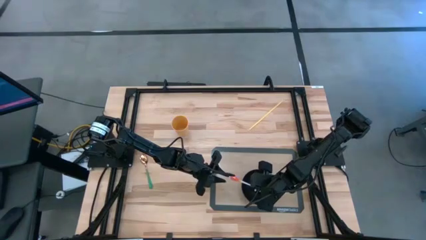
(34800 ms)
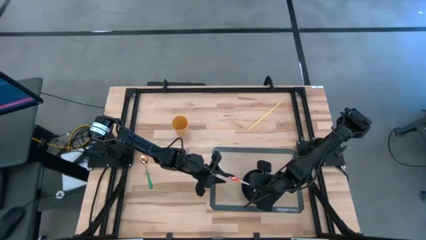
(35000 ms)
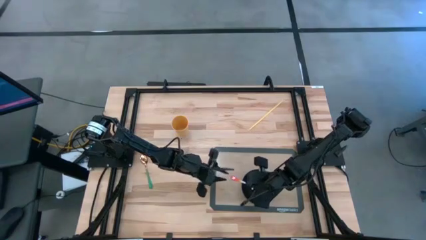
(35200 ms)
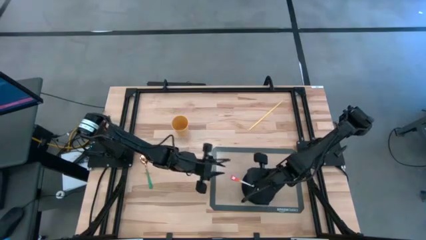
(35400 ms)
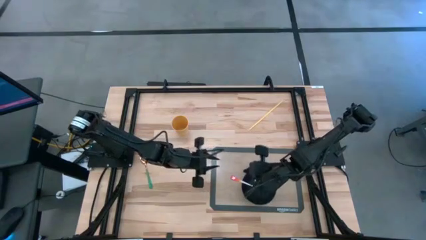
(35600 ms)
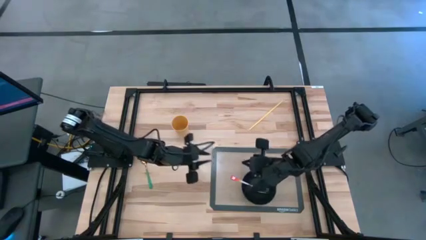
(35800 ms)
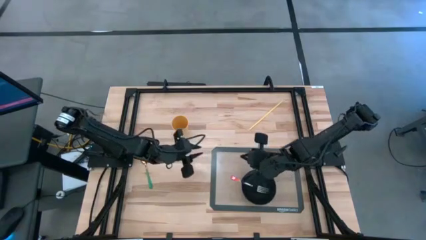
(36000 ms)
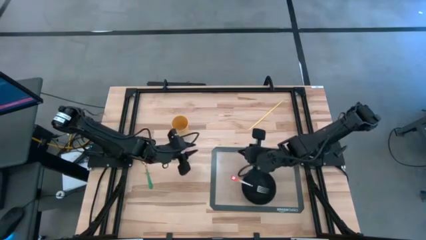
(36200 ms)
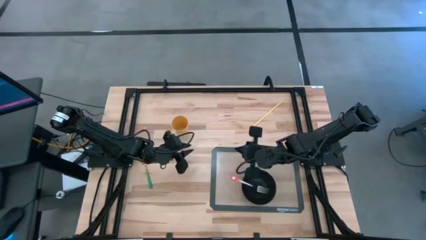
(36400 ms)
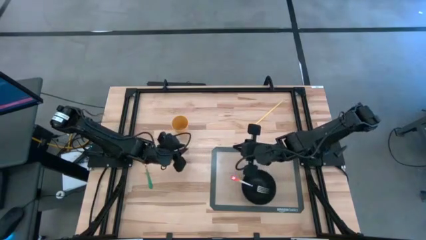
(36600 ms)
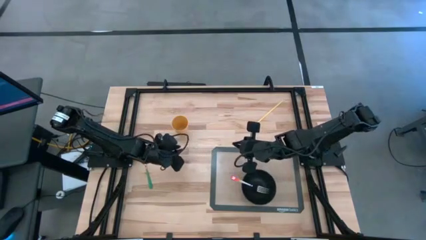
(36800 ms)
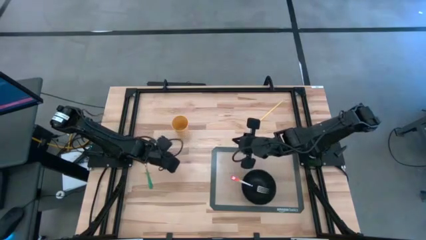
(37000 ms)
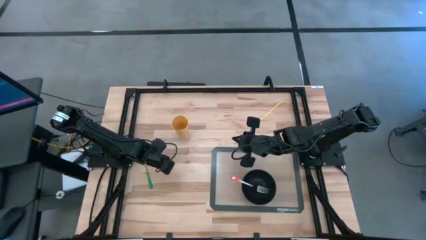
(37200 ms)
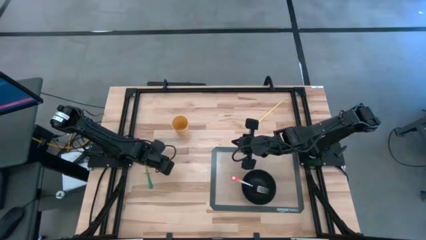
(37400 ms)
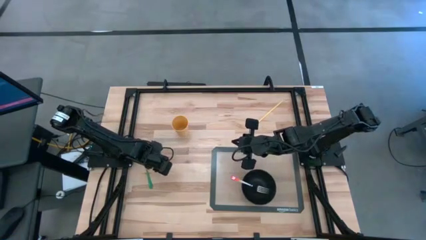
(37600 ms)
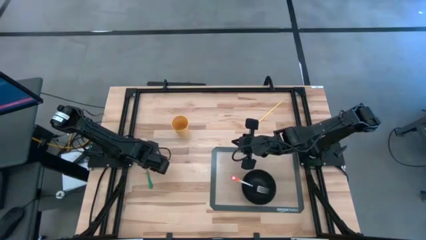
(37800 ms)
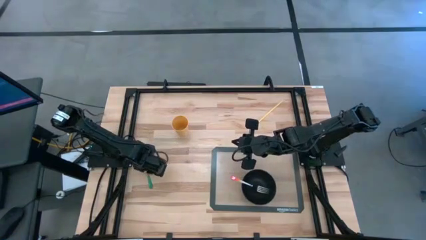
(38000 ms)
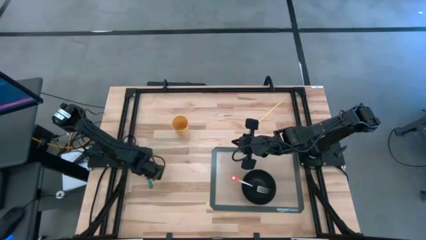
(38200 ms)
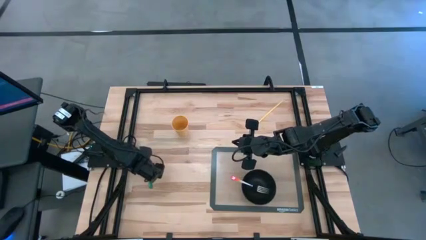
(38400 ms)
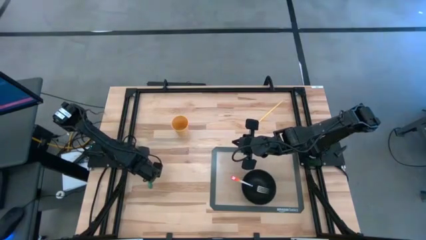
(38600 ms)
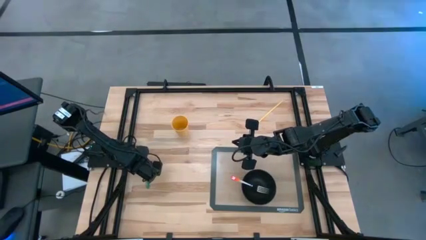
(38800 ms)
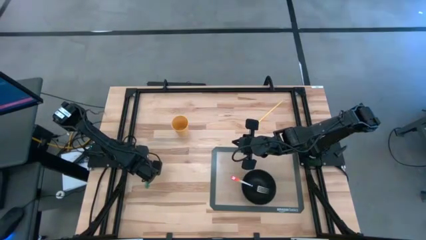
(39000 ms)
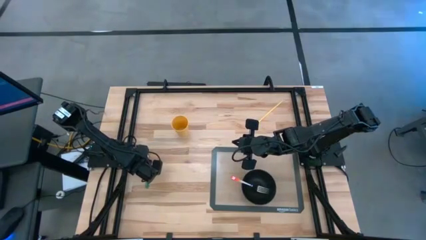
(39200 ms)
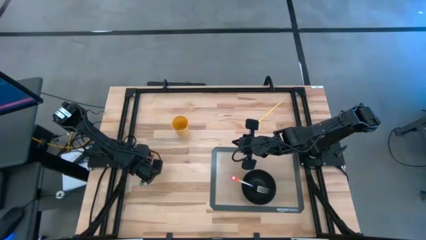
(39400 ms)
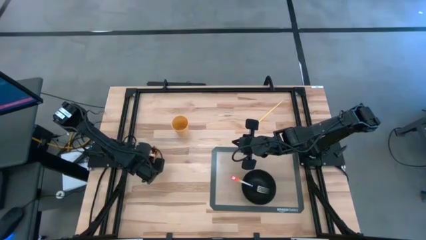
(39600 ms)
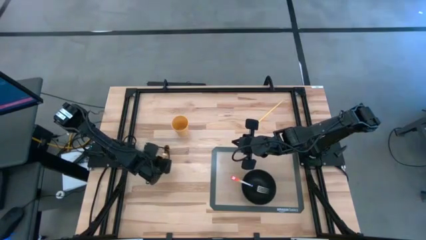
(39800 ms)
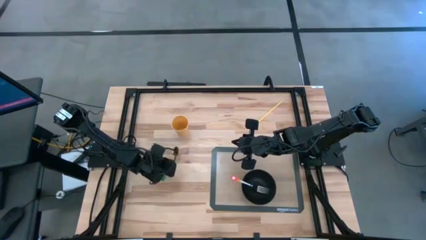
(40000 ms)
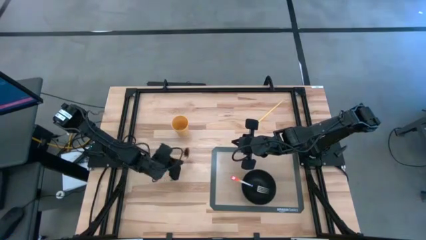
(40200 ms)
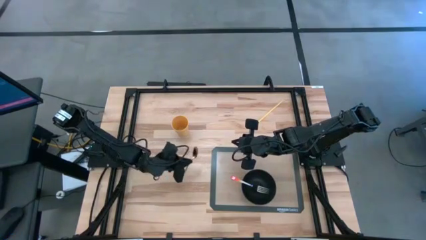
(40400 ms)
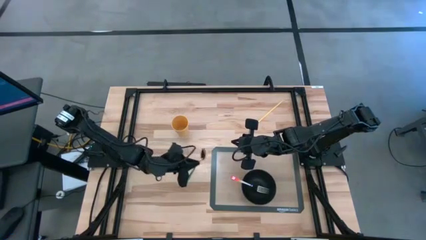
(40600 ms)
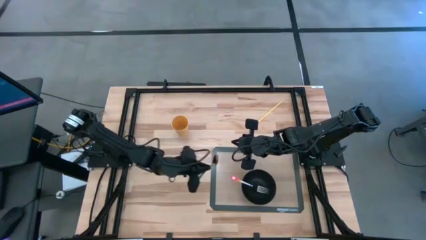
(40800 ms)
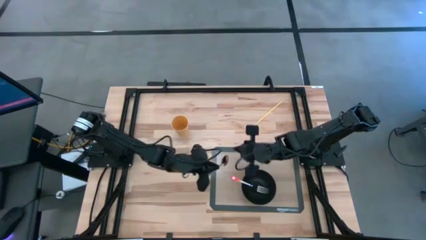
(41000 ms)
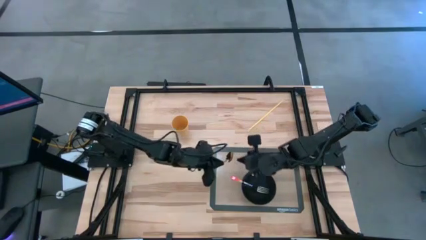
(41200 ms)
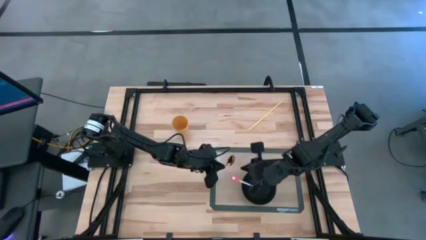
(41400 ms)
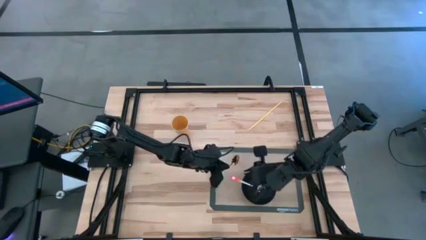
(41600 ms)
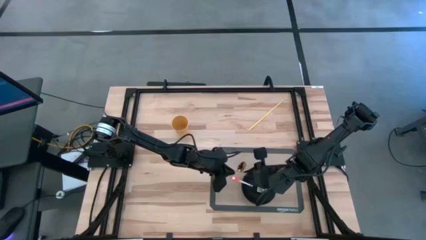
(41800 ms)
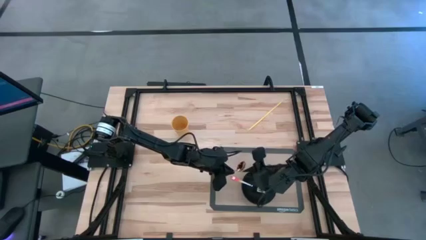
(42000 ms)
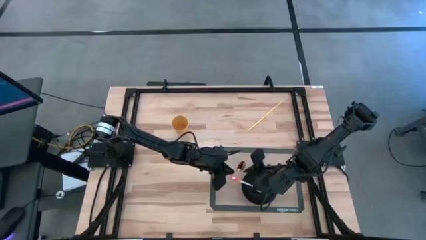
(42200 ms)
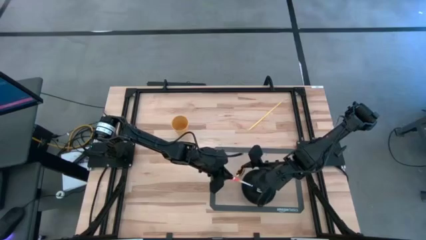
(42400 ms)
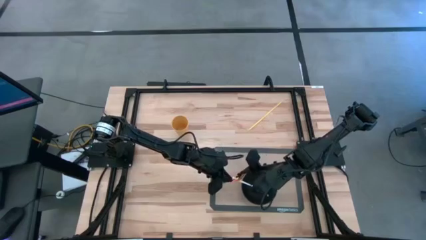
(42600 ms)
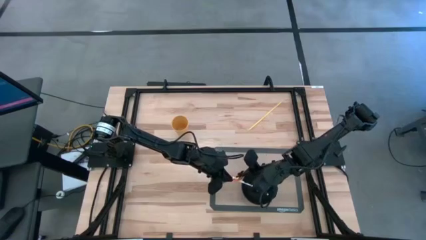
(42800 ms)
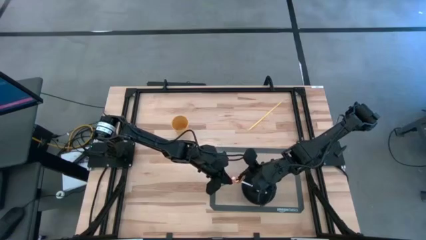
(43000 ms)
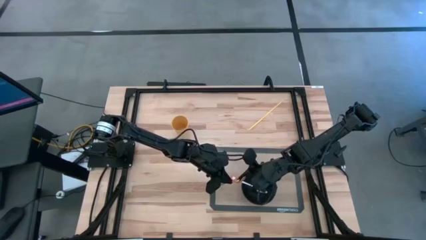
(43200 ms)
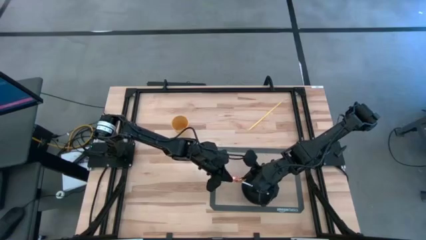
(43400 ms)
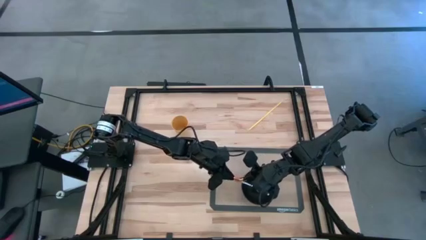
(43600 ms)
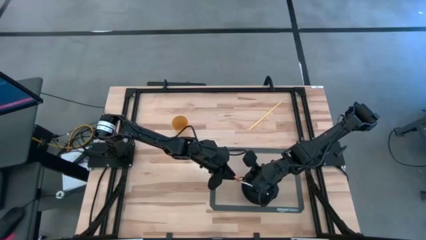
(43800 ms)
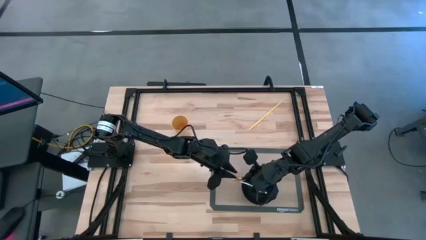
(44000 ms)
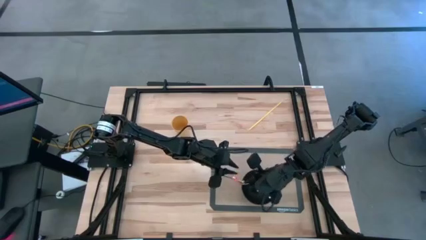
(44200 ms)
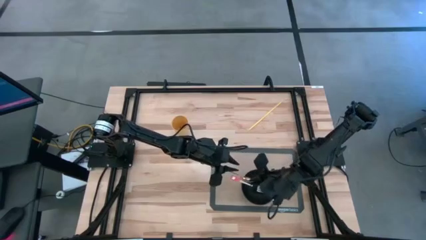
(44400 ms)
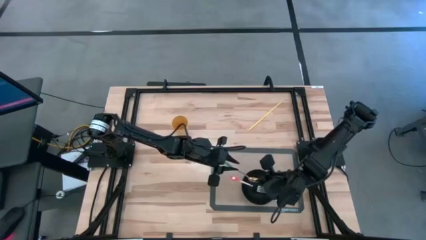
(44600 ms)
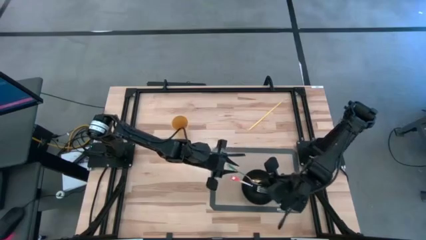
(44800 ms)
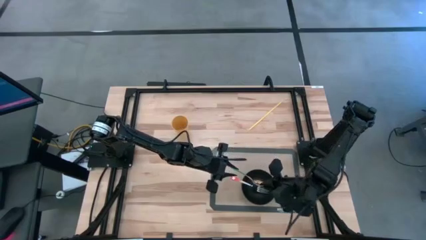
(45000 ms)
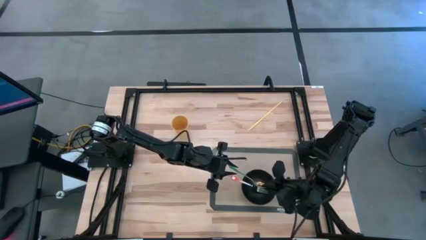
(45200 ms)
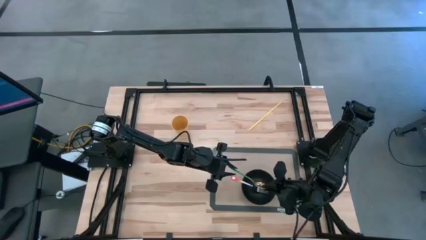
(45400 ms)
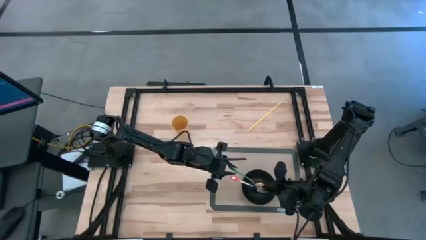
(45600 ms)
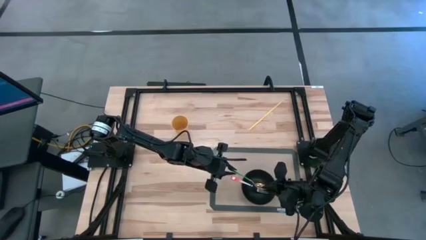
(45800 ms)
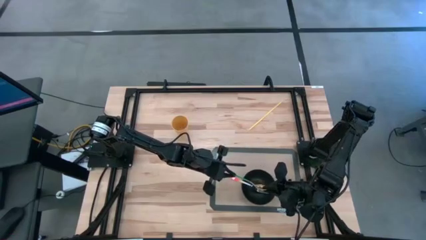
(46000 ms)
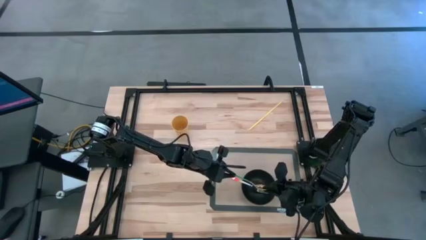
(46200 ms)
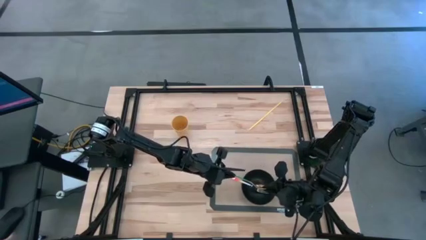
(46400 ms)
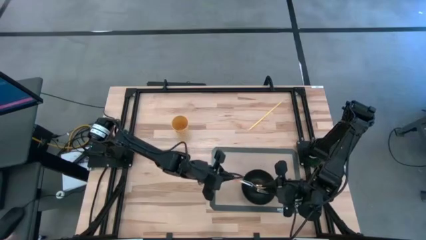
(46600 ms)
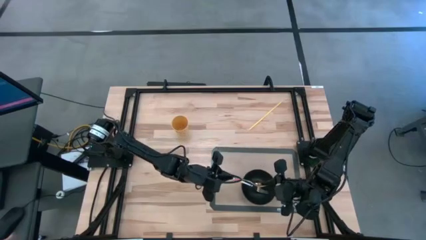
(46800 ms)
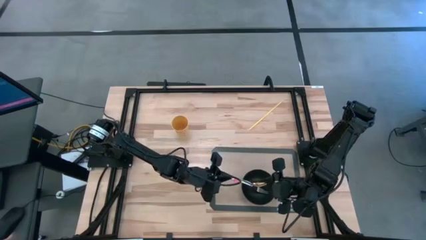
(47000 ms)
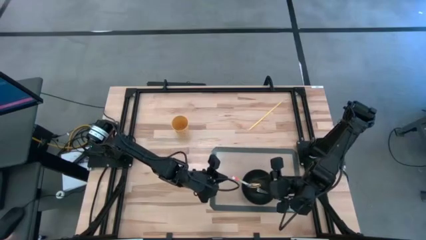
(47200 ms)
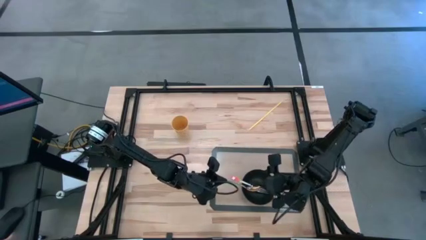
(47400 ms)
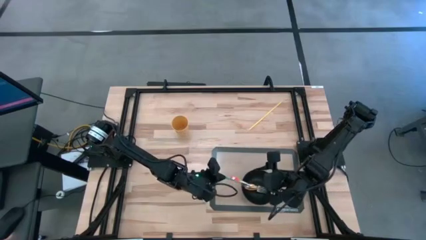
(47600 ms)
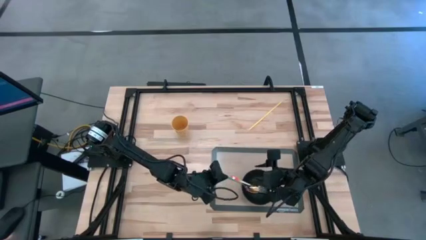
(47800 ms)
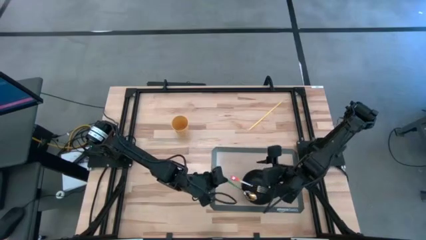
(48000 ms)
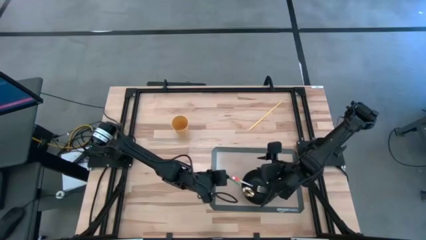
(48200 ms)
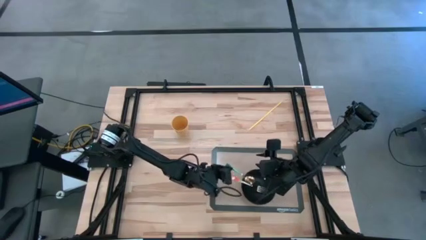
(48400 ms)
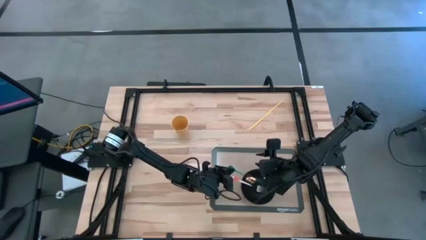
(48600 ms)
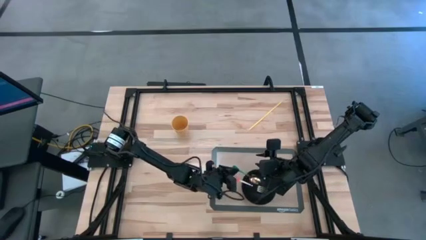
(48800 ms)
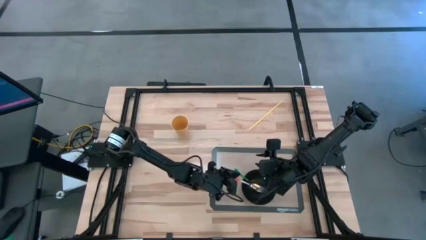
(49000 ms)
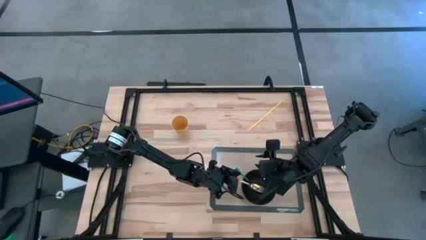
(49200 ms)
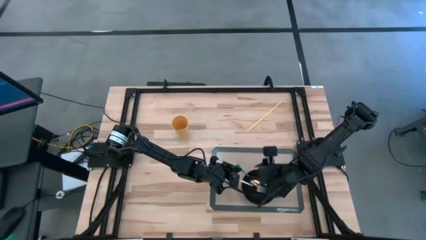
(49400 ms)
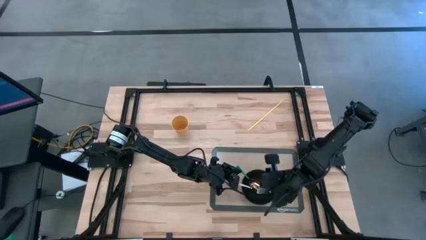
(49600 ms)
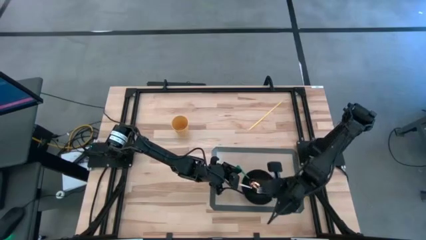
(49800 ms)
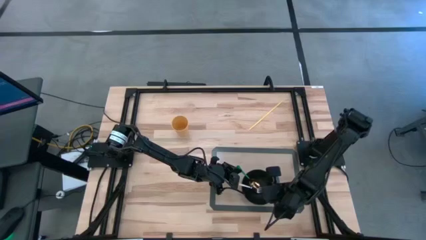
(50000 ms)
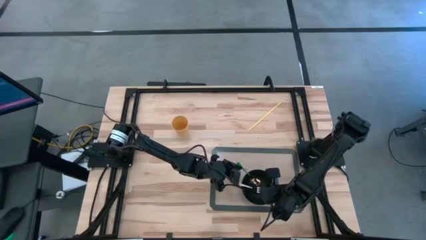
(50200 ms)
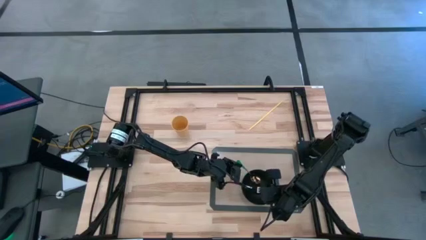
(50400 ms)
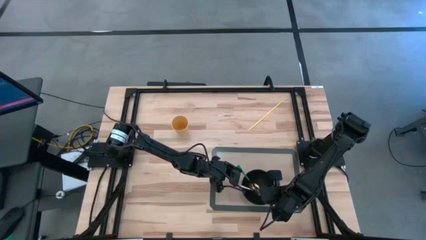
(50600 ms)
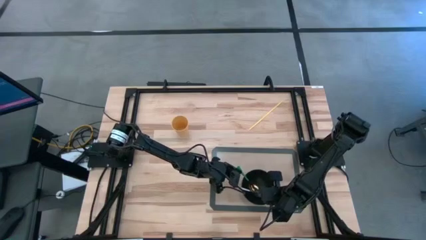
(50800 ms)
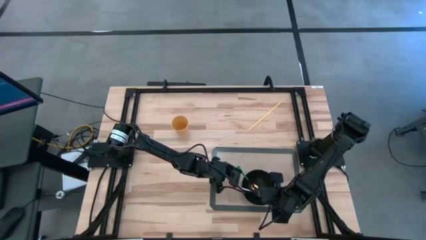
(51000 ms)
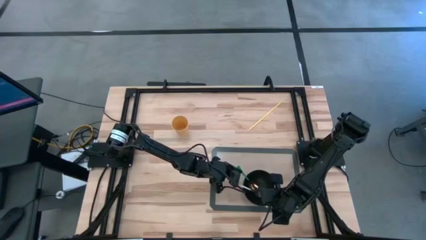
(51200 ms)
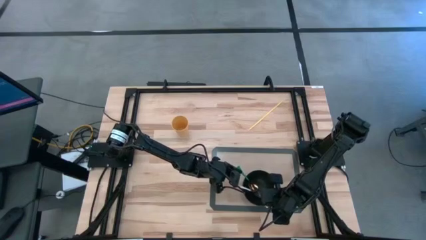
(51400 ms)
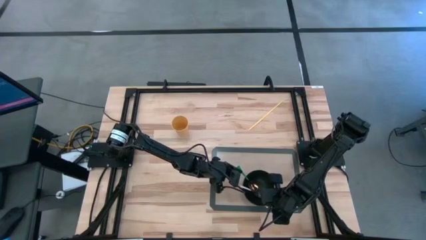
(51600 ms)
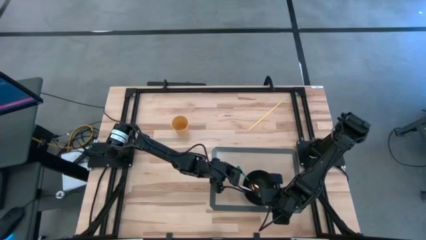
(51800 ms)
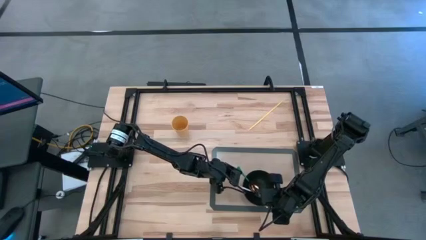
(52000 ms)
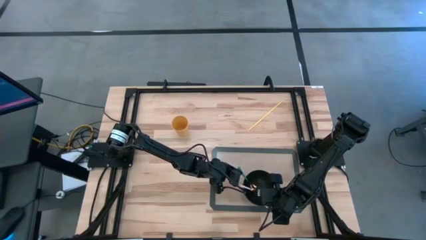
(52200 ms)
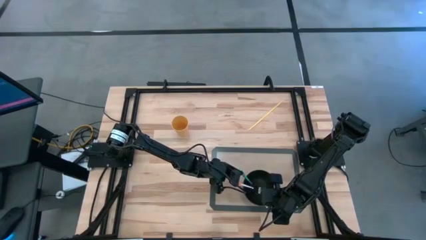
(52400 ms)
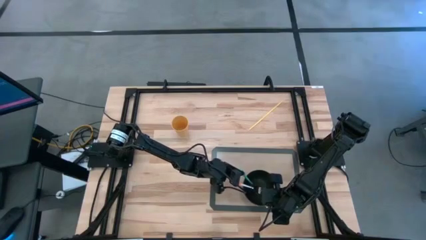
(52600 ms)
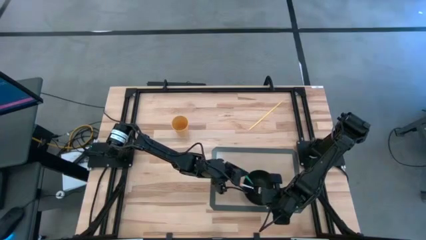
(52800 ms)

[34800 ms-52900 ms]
Task: Pick & Place Utensil
Put the gold green spoon into the black bowl on the table placemat
